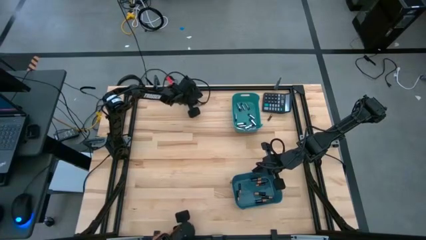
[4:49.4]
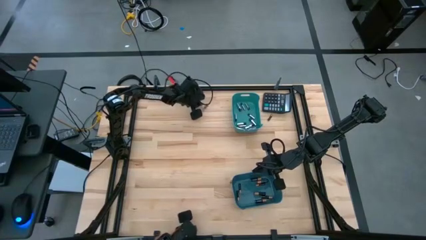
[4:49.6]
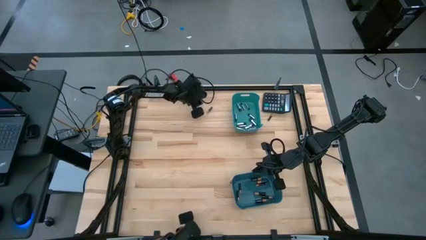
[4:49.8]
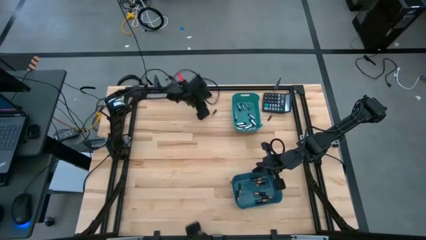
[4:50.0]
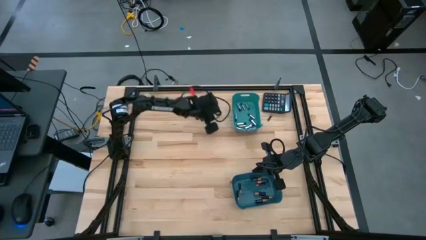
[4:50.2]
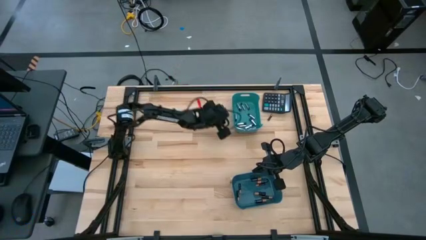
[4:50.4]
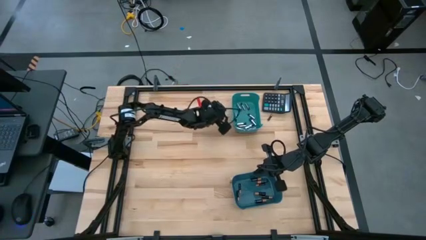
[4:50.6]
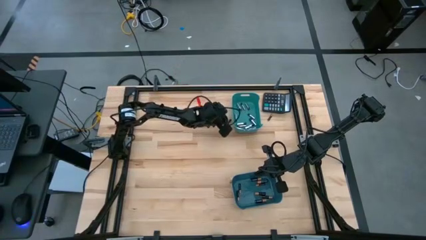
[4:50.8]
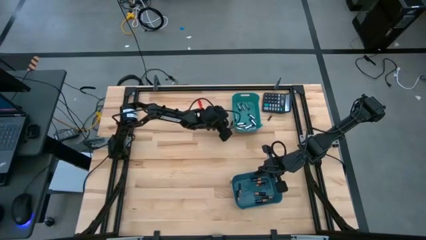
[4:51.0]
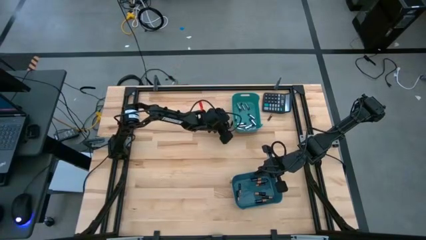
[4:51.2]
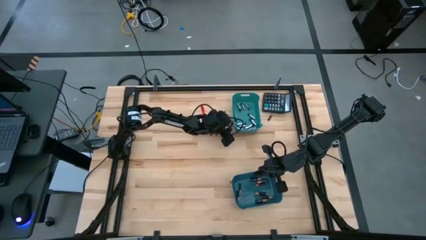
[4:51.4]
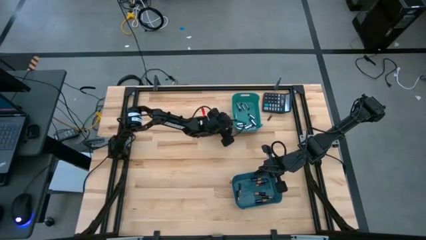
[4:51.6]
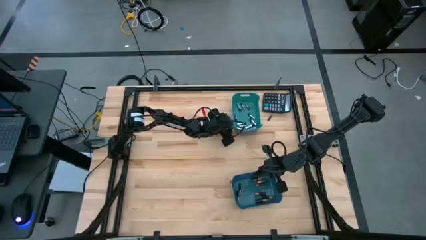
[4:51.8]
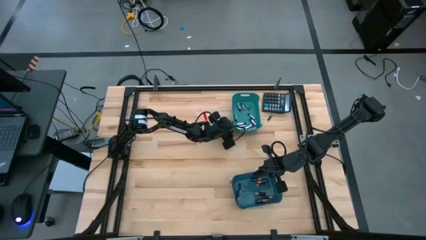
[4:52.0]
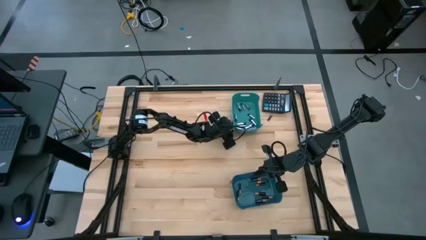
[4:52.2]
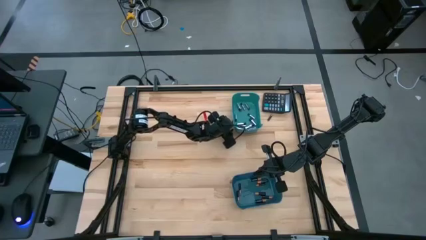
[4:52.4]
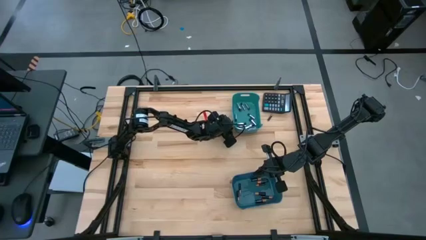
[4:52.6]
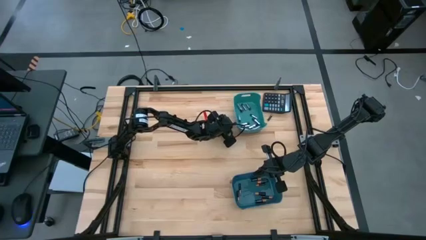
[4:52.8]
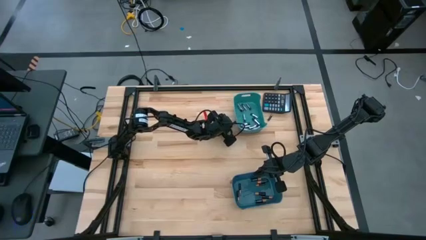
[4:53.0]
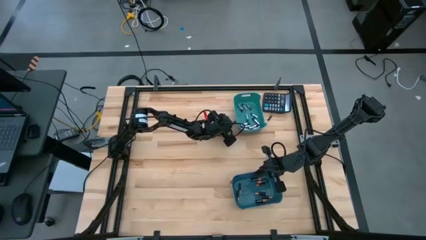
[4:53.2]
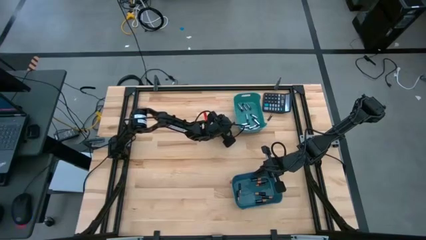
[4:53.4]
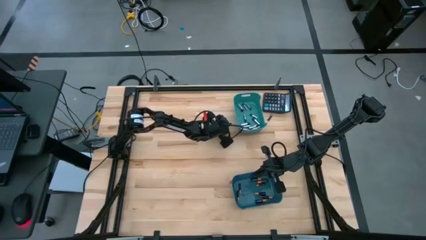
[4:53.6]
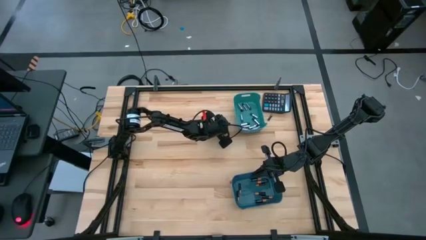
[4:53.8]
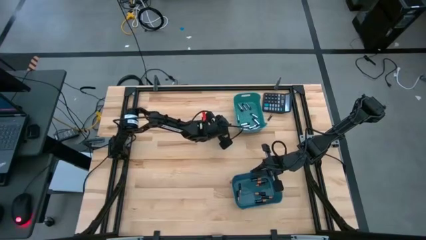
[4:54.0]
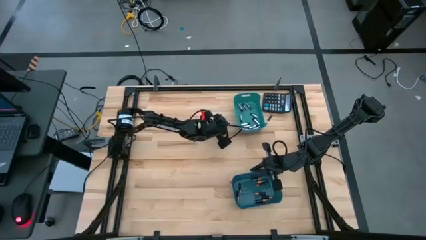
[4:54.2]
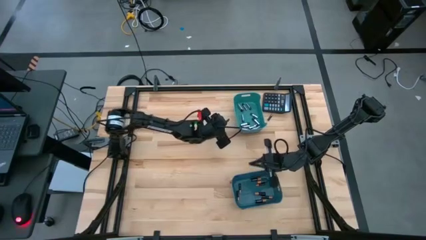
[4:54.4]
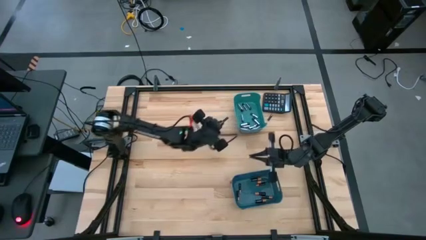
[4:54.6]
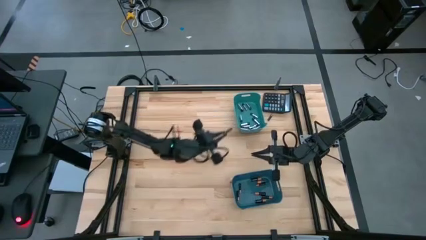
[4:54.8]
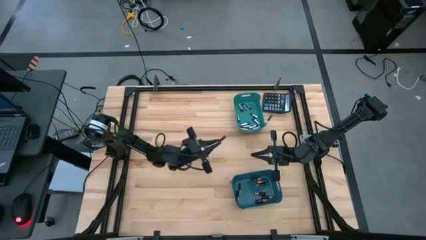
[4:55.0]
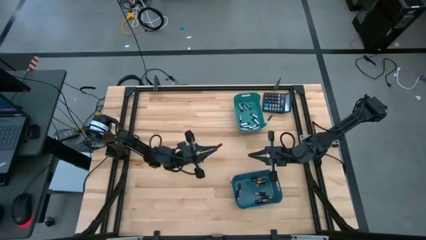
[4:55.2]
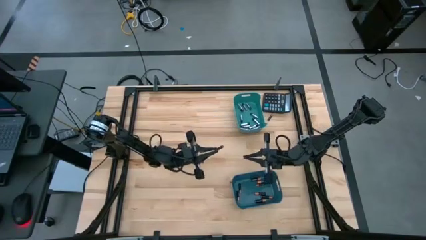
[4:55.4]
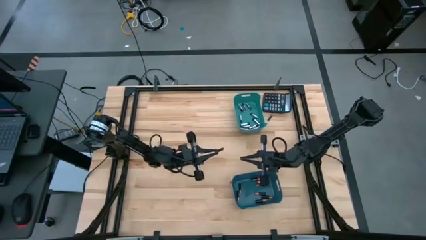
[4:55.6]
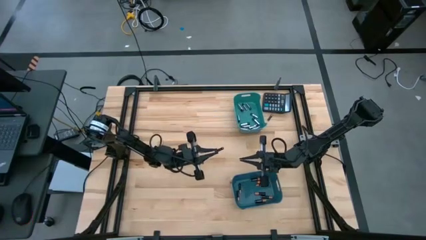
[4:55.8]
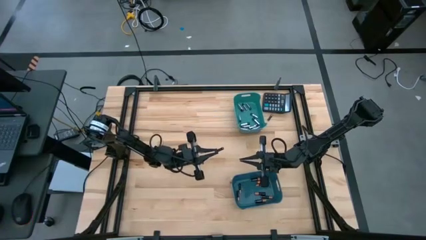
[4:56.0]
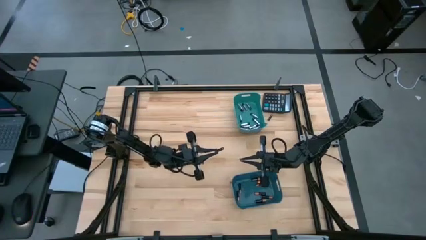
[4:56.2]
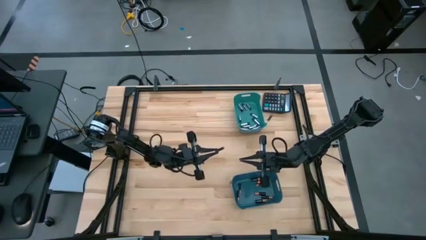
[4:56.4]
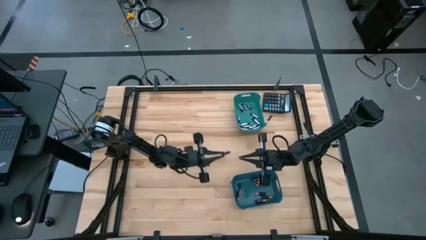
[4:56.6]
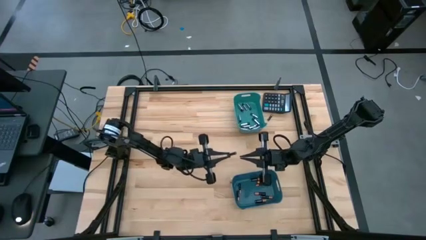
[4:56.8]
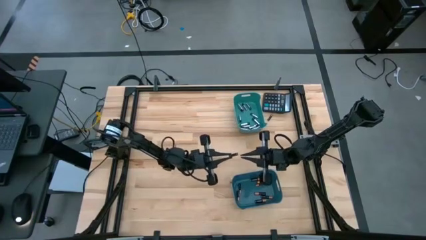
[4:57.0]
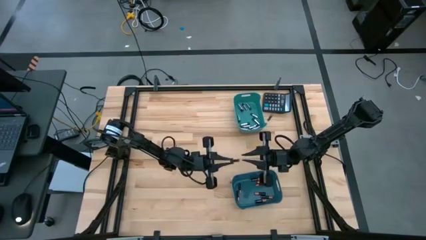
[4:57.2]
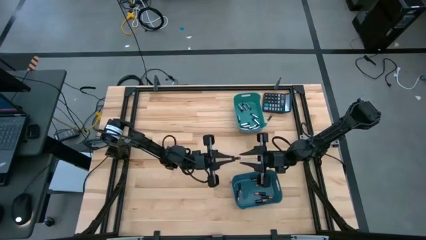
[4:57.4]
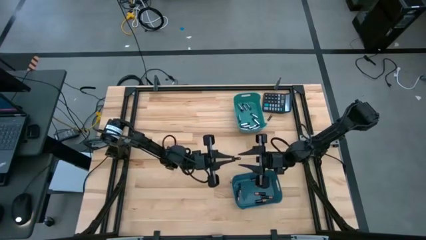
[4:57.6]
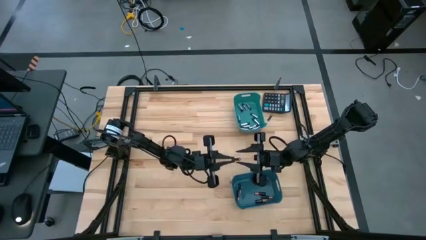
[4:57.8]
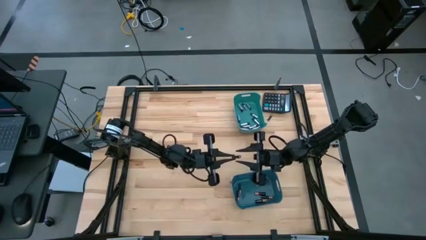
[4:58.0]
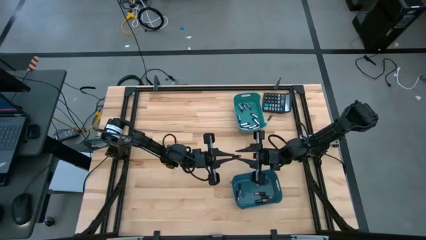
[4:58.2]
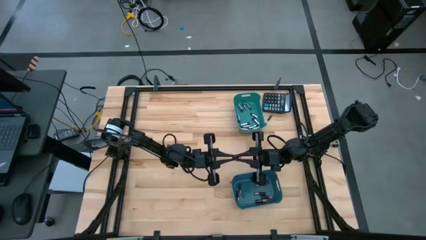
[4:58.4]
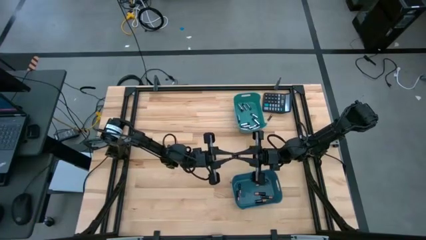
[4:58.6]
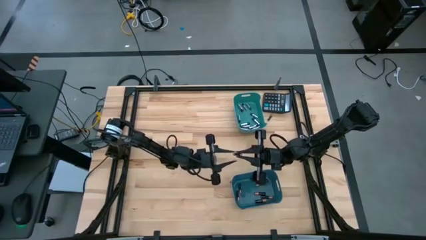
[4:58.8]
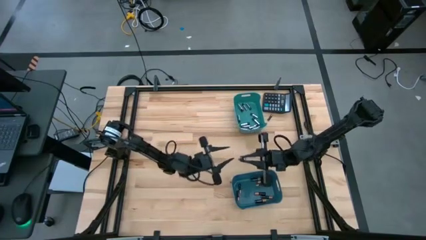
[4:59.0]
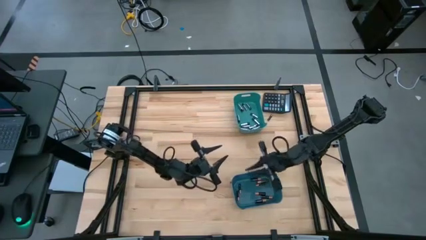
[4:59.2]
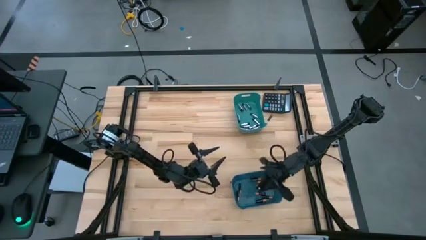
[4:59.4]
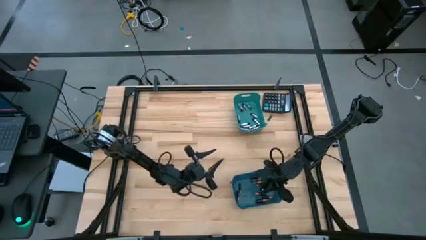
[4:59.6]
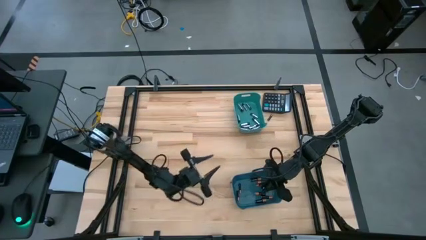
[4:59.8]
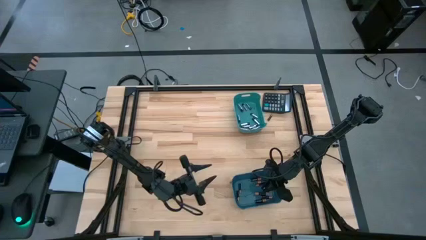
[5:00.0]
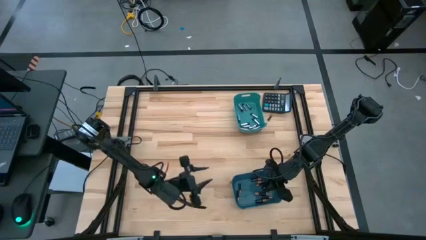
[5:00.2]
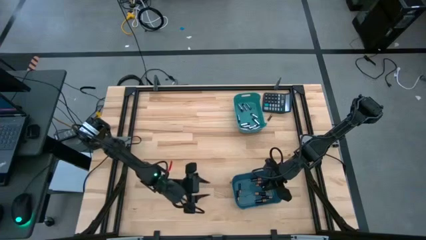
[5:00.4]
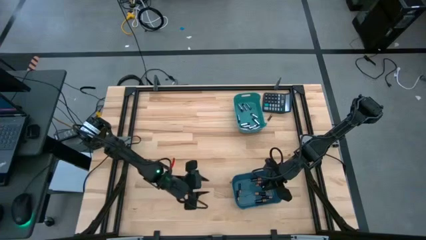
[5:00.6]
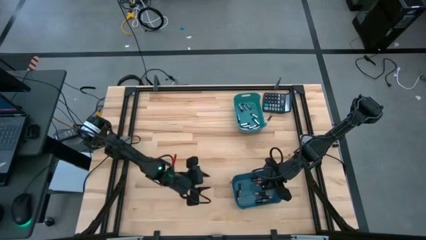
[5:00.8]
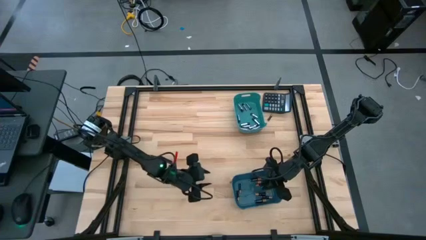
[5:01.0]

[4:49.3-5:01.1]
Task: Sort batteries
Put the black battery into the blue bin

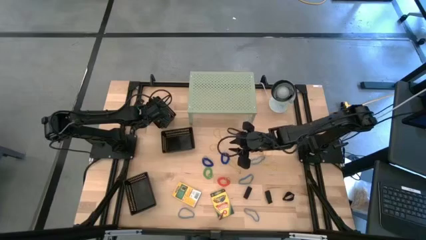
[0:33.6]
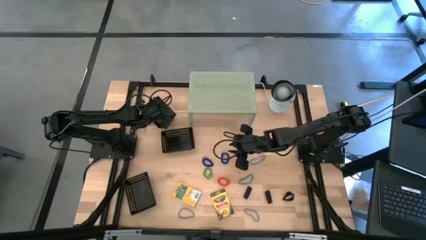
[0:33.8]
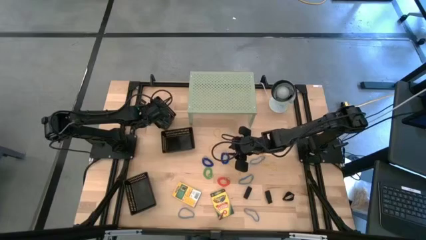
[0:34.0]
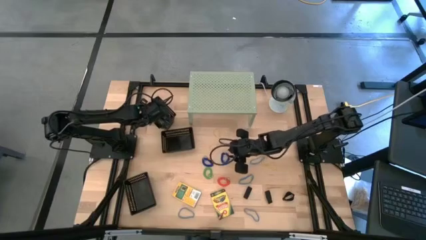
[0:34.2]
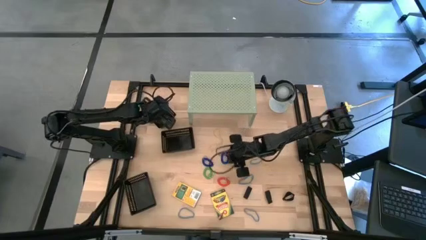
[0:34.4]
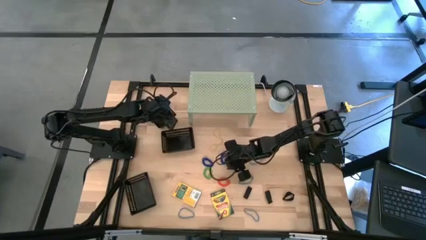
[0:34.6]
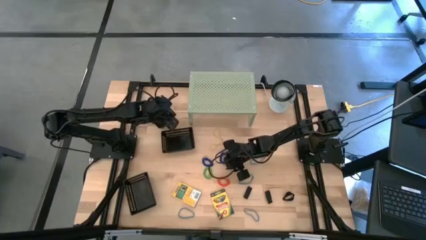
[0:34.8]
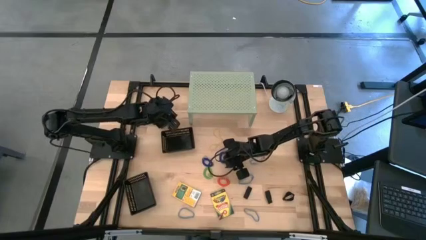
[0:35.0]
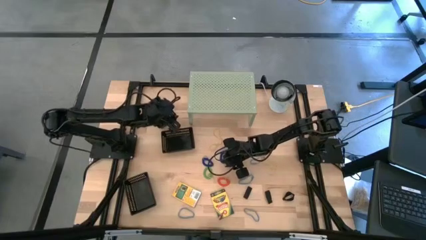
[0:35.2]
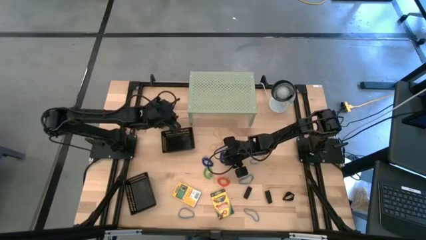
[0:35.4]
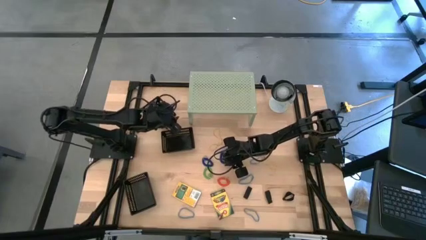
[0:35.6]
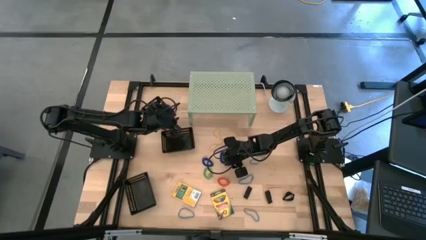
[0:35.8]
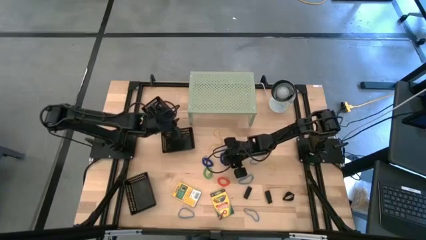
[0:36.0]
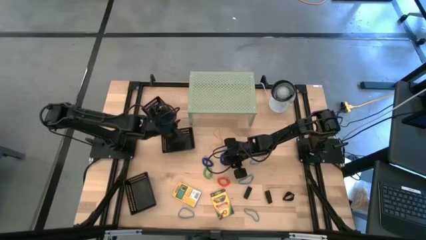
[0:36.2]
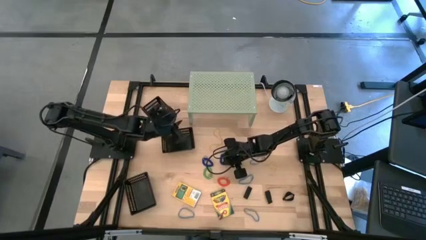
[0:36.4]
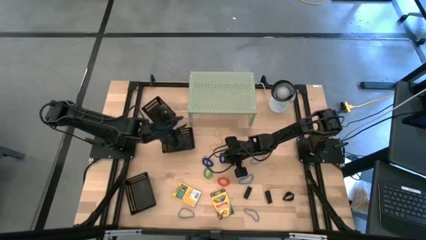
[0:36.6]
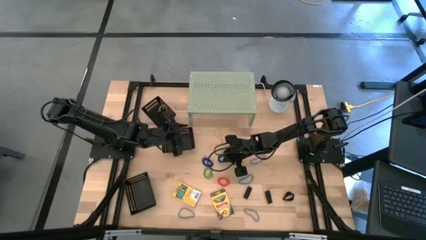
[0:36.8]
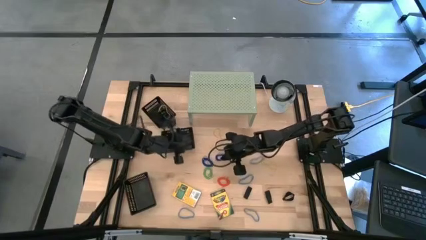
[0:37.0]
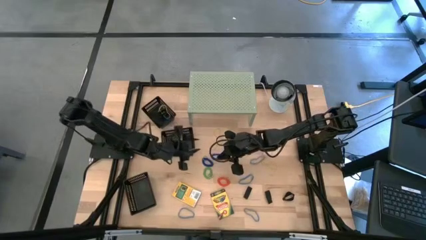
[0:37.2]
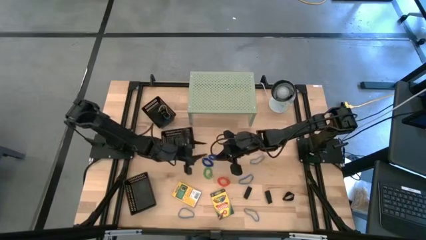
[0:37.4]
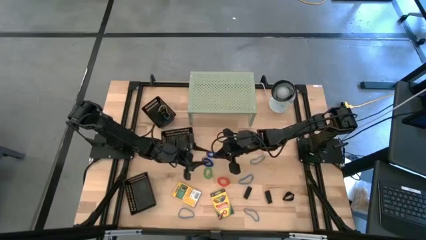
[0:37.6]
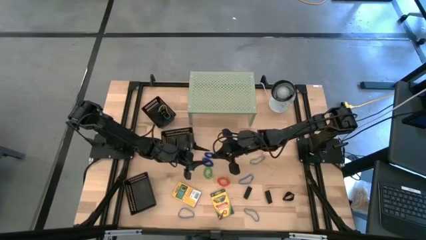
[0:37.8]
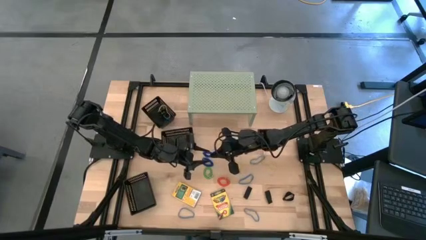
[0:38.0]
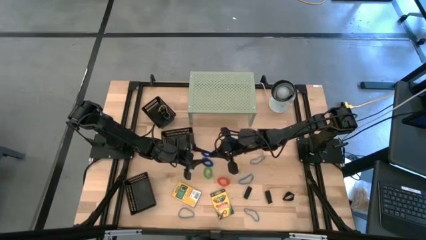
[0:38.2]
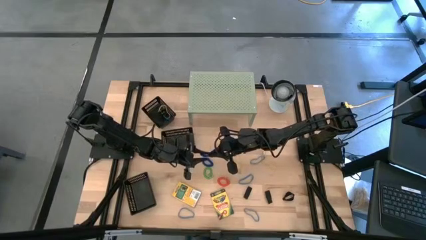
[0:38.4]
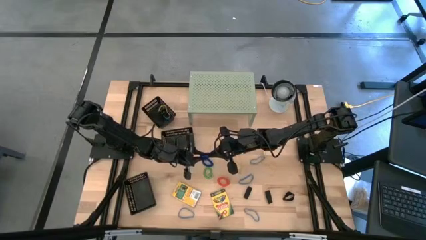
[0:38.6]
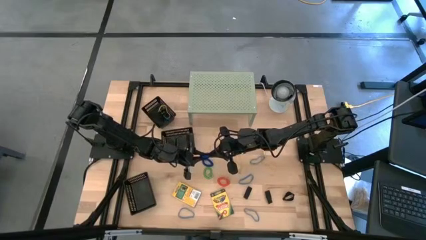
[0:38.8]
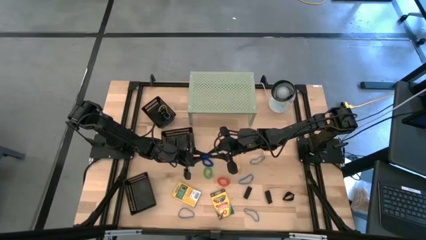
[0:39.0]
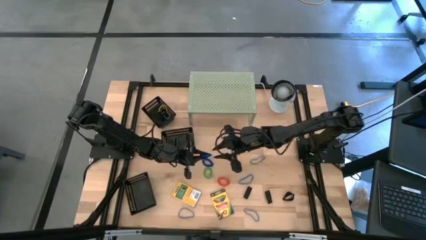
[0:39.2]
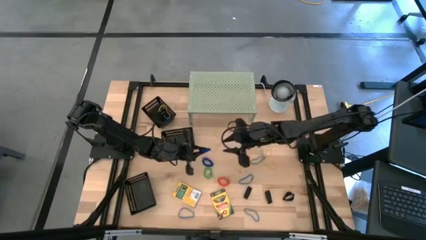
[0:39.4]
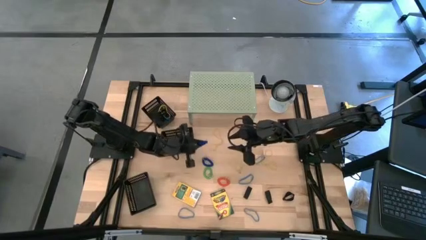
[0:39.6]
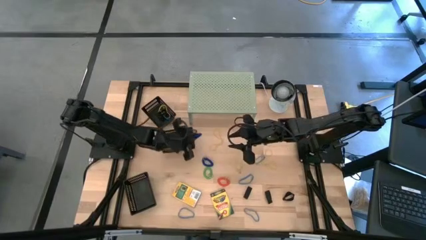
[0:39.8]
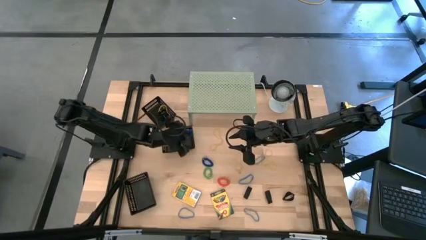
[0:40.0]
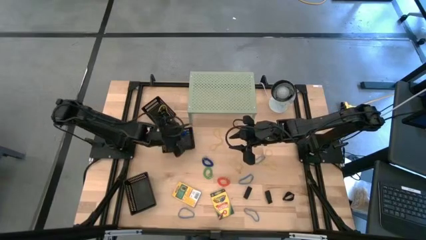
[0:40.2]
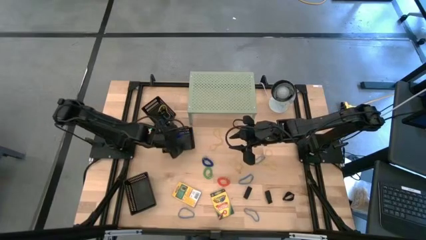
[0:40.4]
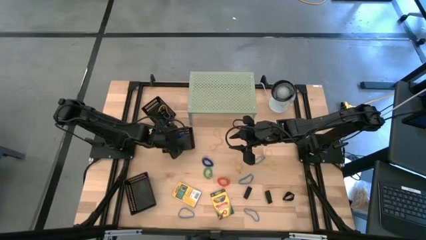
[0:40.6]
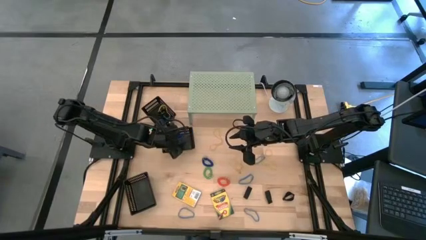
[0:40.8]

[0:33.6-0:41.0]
Task: Pick & Place Office Desk Supplies
Put the right blue spring keychain into the middle black bin
